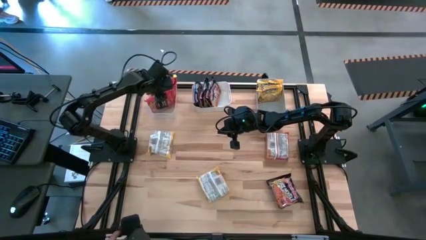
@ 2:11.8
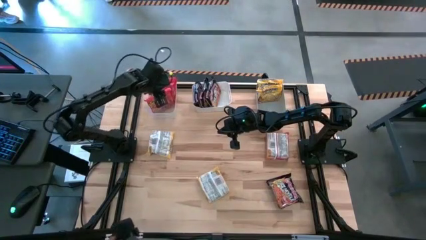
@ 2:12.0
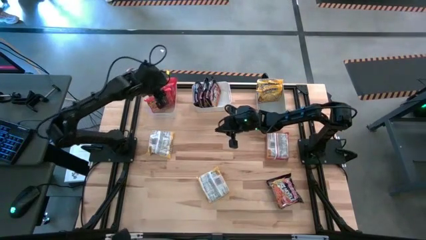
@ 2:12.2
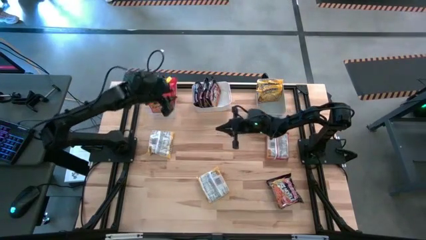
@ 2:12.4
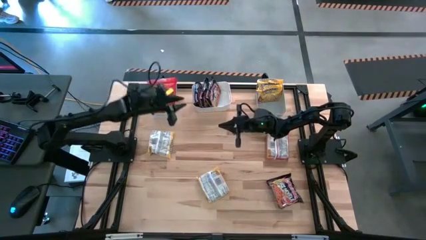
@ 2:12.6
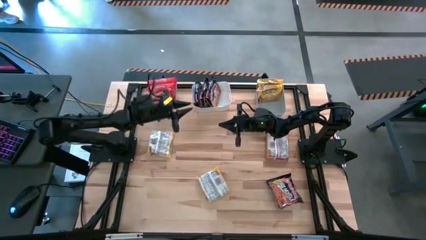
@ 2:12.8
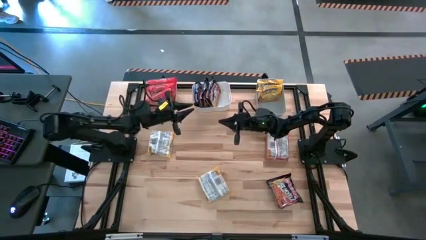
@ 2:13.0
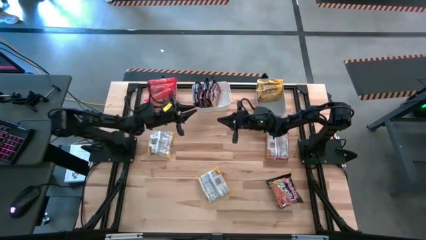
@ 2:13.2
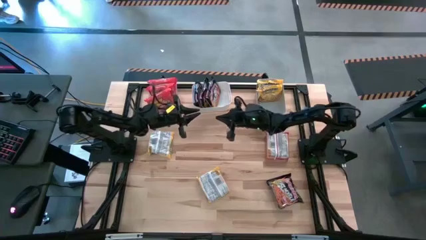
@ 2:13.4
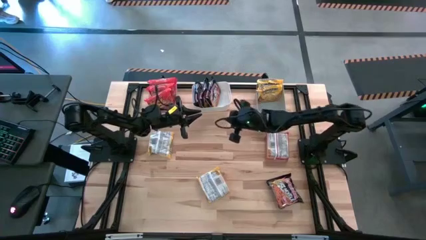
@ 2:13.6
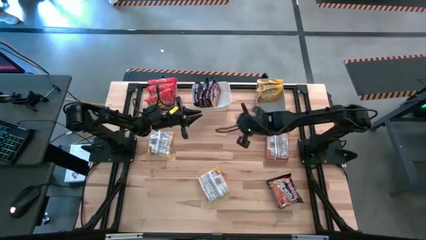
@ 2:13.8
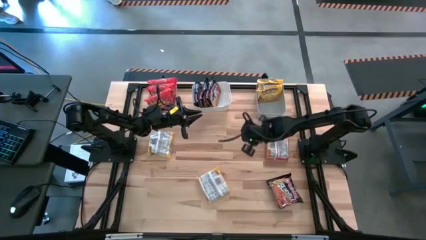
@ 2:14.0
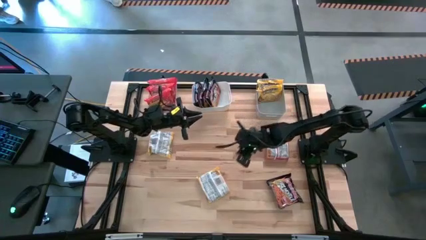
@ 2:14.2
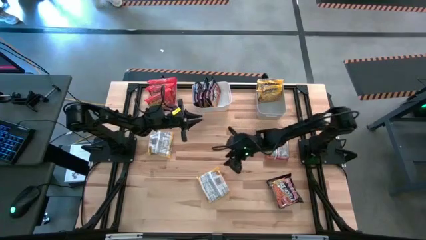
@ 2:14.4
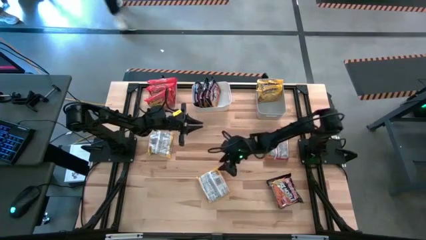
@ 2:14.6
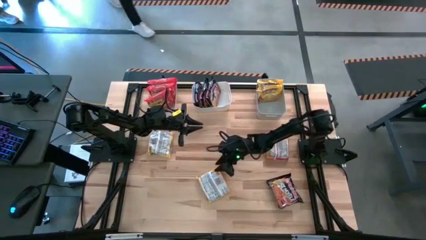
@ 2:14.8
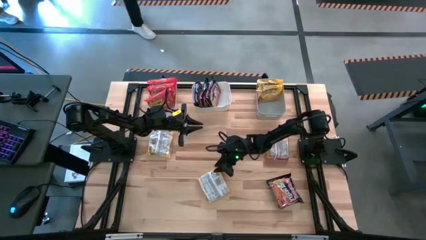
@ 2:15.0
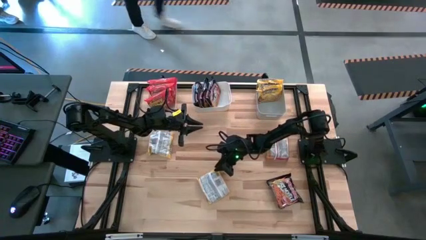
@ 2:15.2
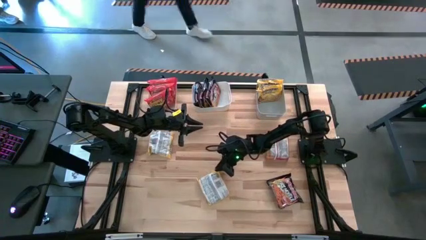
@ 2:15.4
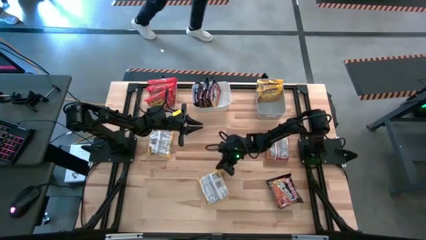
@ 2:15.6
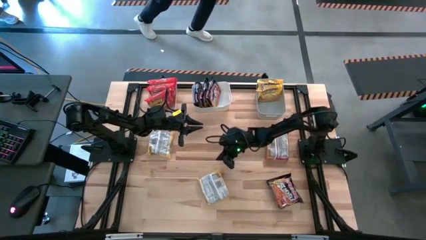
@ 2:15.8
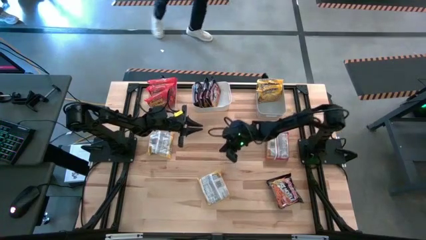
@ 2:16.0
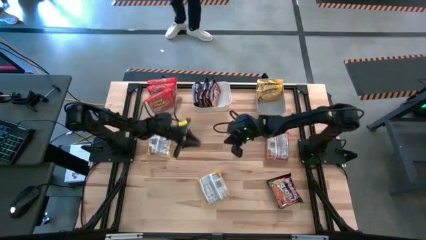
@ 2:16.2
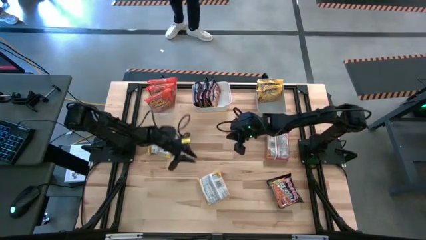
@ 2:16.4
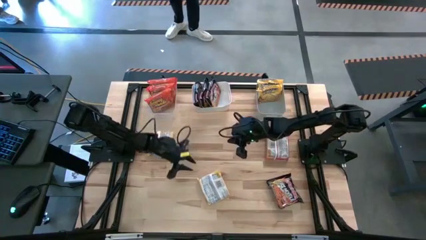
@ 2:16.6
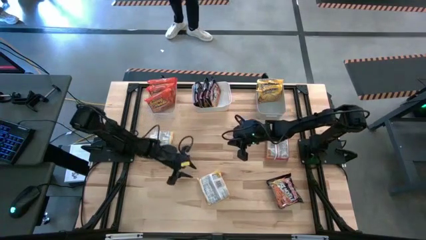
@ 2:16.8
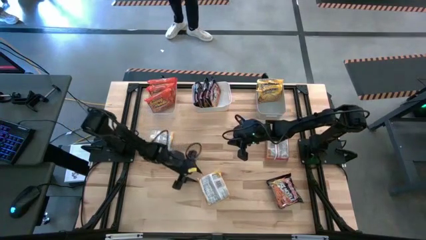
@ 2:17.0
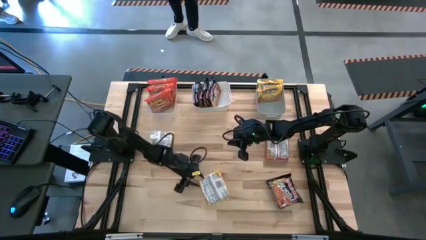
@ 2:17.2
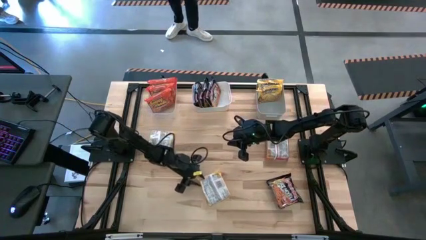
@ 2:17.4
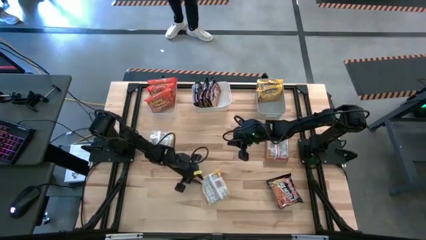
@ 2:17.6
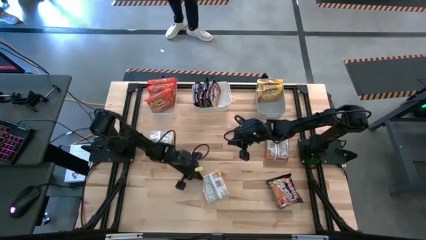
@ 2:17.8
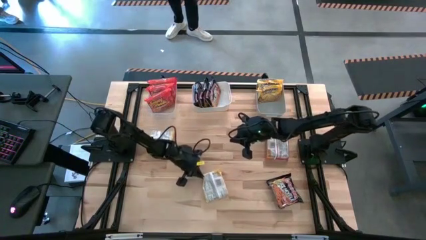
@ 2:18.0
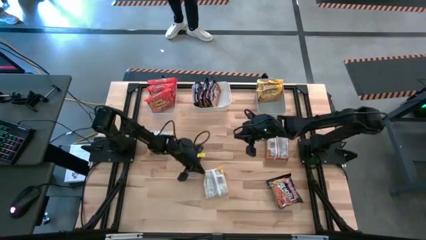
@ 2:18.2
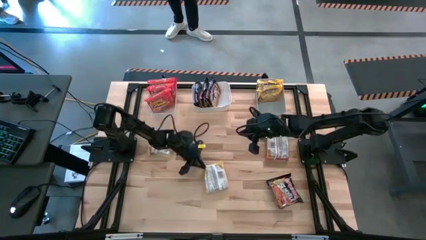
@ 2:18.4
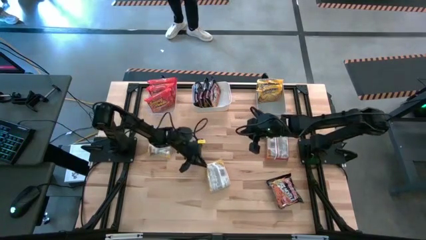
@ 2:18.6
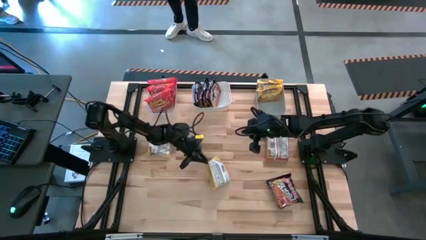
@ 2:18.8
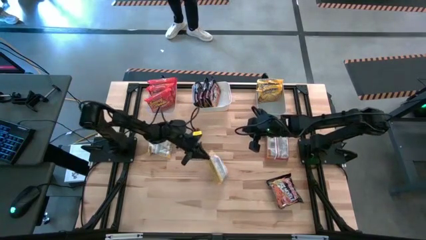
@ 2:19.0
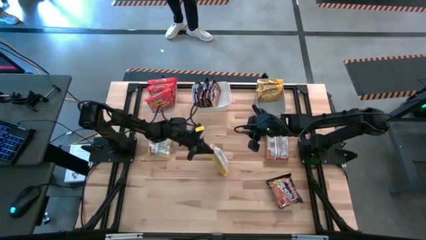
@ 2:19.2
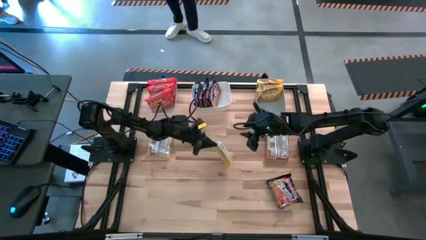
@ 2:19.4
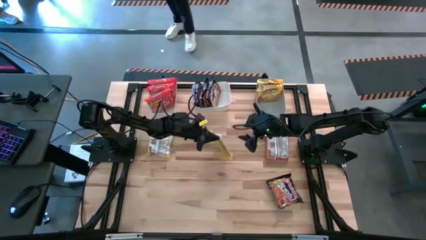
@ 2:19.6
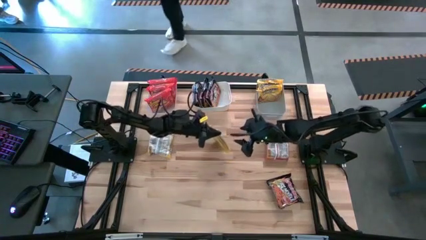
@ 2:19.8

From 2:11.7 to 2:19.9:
Task: Sort Maruchan noodles
Put the yellow noodle pack into the gray bin

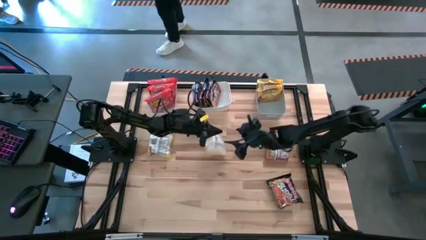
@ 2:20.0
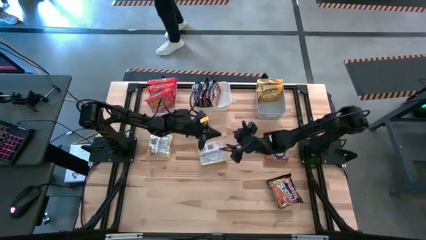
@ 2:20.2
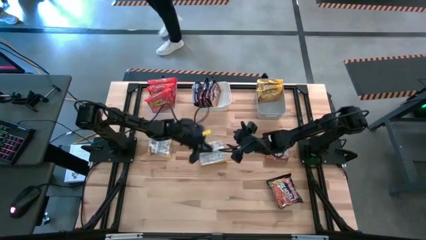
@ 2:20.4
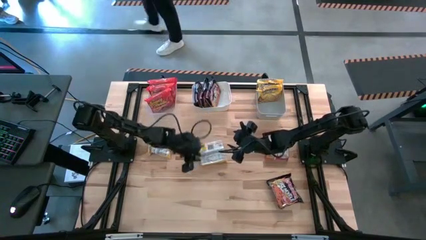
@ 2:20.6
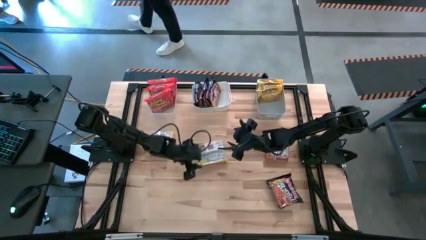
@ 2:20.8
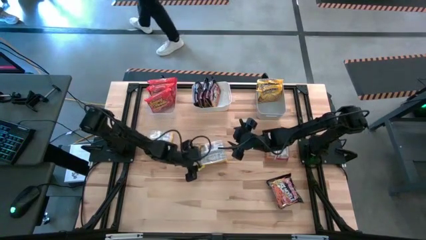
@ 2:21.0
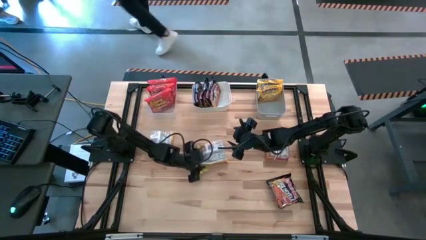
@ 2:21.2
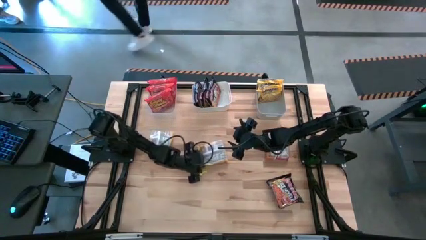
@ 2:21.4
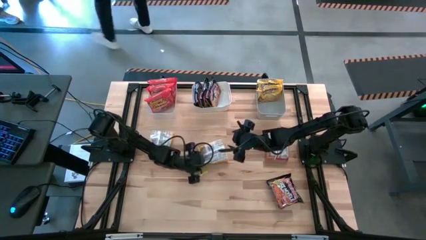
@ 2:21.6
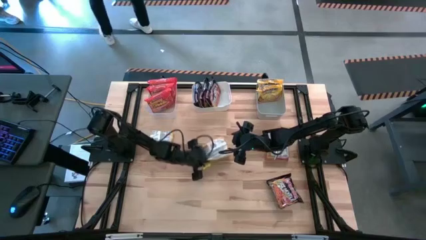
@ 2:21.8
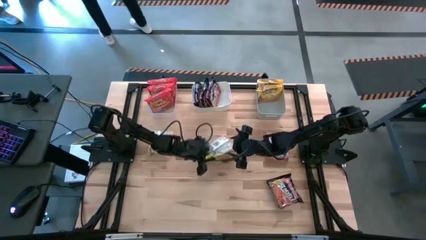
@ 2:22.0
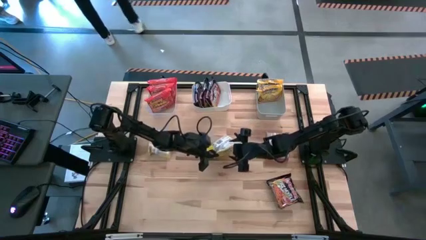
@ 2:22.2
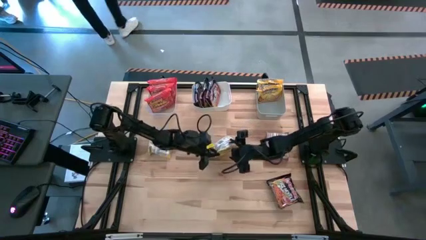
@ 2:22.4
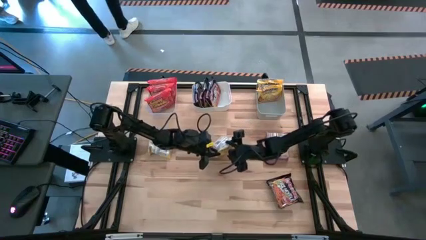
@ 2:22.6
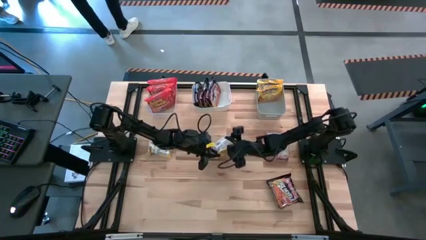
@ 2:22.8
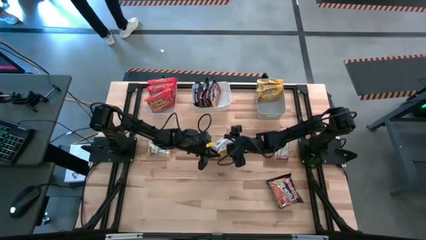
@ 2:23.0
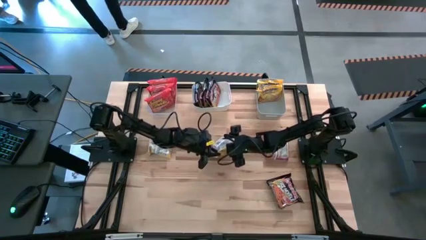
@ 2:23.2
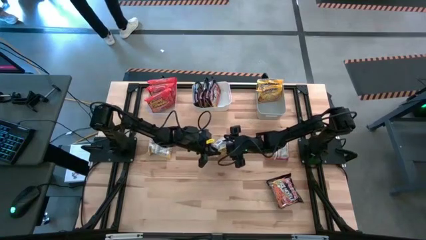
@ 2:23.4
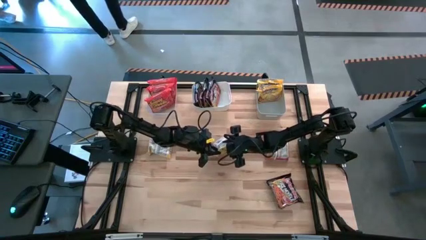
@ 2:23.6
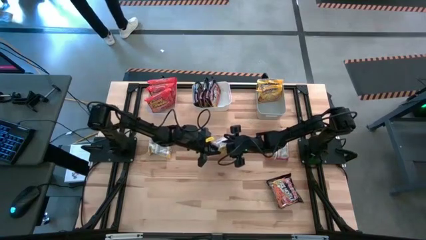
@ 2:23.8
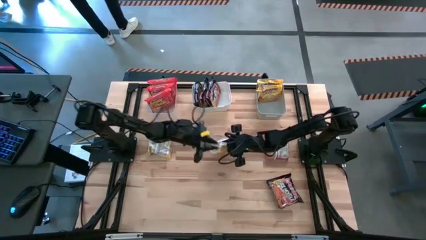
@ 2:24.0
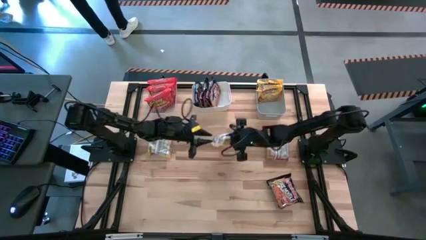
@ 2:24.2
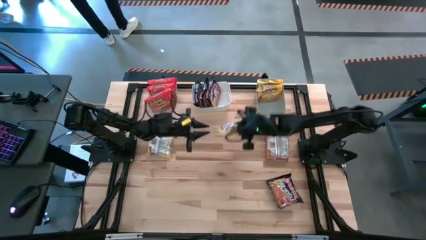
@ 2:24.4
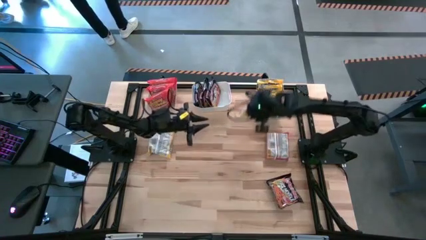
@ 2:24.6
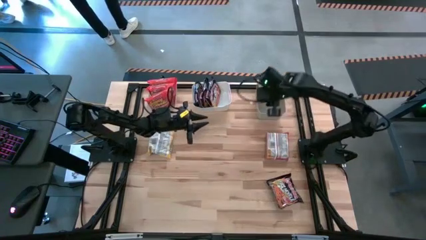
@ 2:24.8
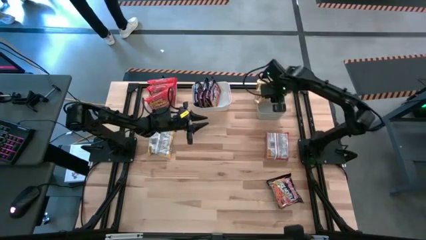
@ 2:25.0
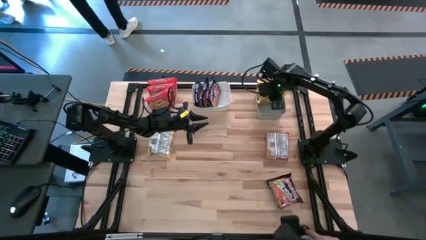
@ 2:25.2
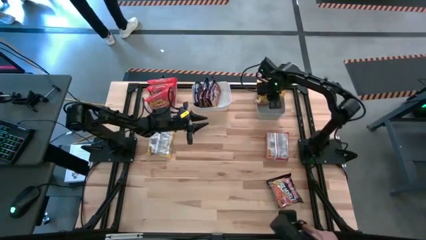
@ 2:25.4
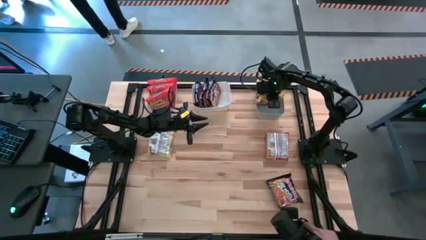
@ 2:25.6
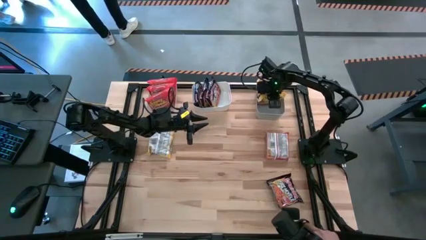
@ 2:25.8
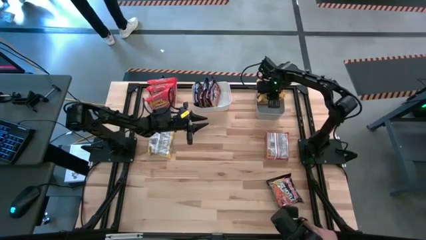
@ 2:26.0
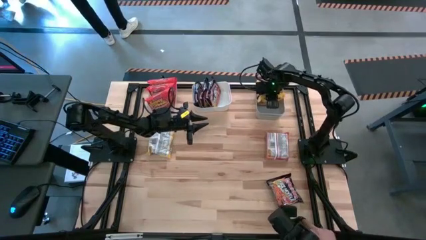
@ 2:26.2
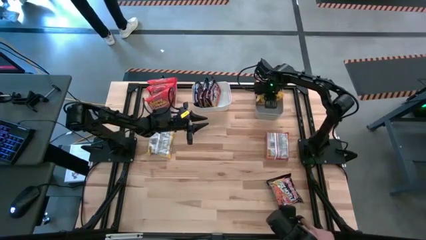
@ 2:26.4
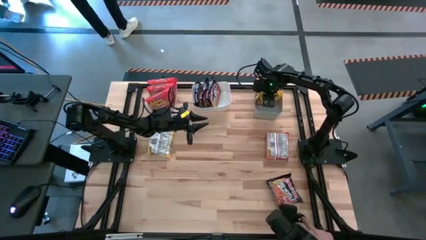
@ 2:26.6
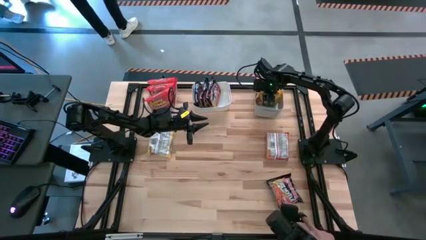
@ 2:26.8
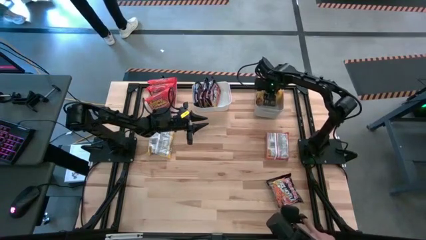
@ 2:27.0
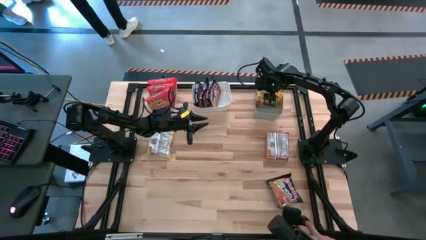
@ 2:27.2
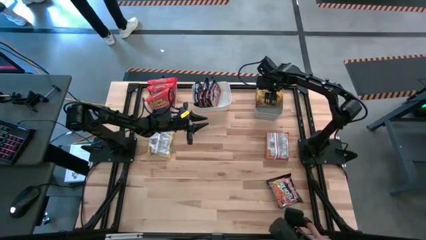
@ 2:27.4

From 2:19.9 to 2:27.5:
Put the yellow noodle pack into the gray bin

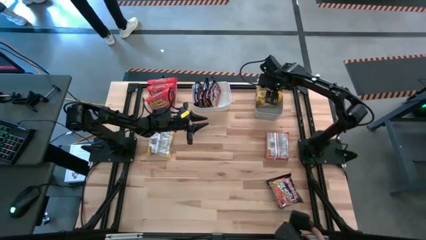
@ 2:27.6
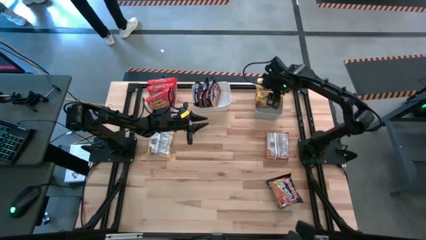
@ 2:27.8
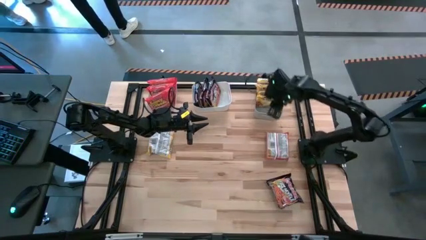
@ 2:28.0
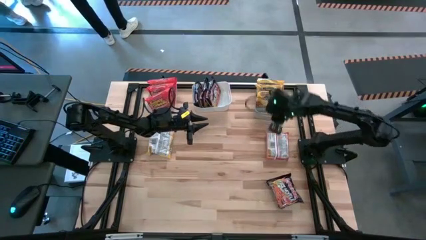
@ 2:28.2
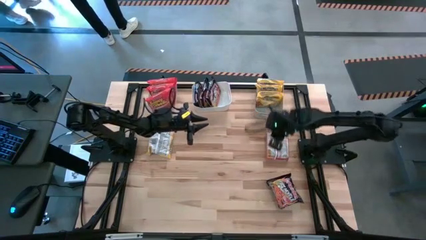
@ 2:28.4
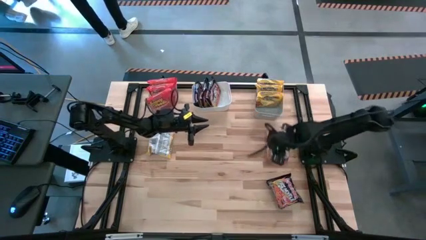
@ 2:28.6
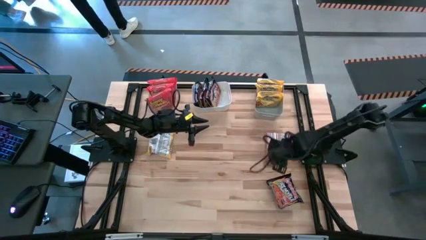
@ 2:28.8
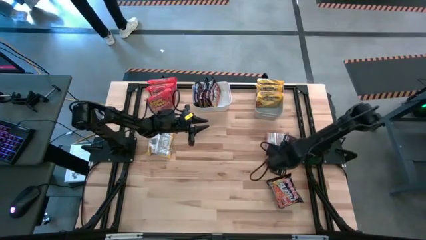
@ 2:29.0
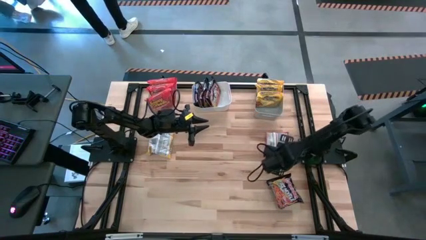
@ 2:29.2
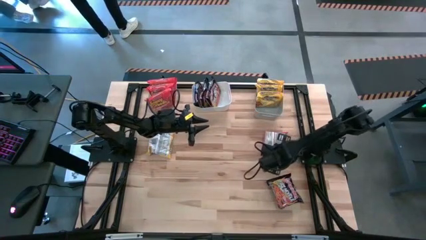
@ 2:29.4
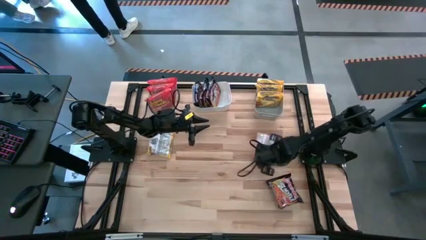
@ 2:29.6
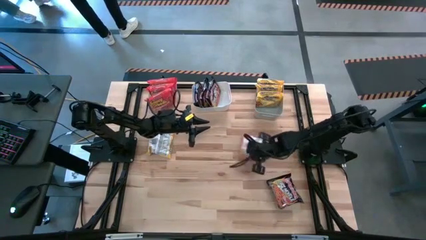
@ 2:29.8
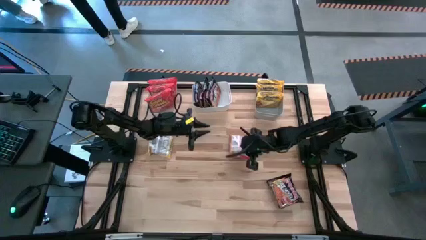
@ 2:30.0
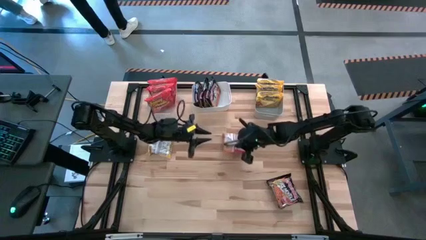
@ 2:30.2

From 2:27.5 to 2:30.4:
Put the orange noodle pack into the transparent bin
